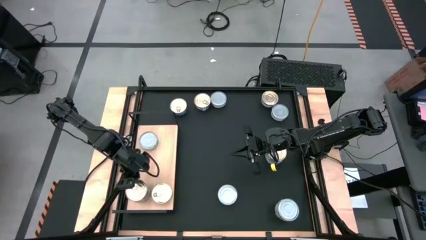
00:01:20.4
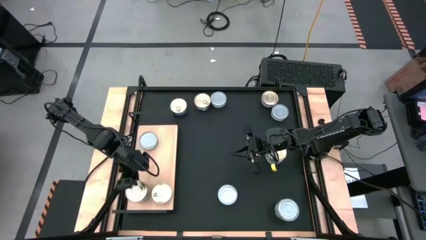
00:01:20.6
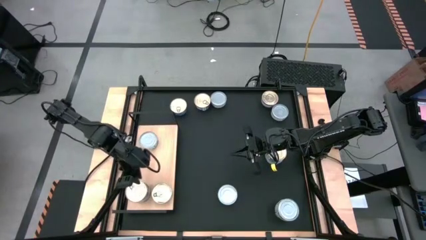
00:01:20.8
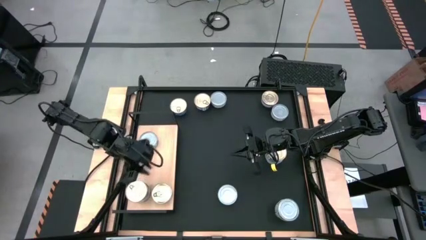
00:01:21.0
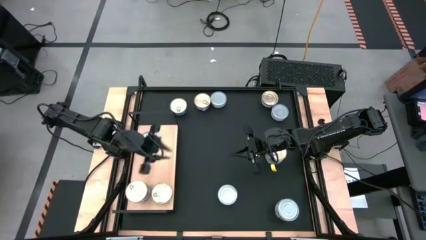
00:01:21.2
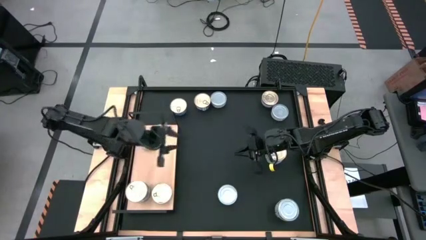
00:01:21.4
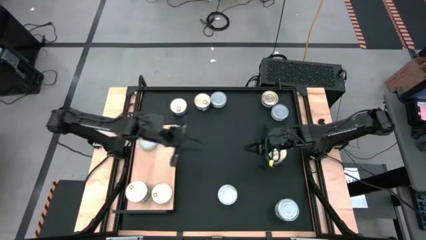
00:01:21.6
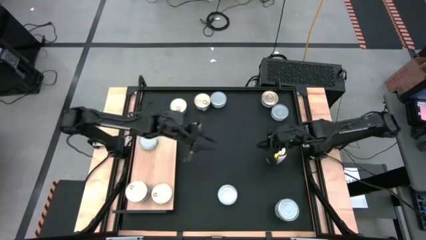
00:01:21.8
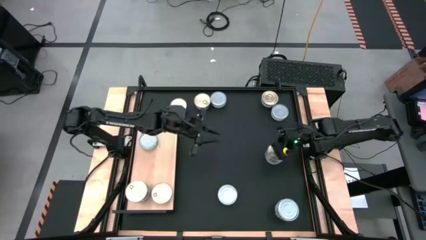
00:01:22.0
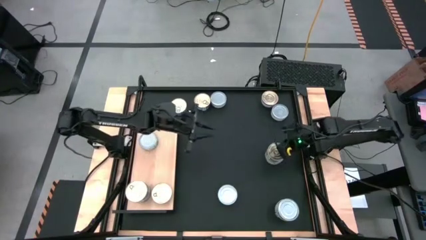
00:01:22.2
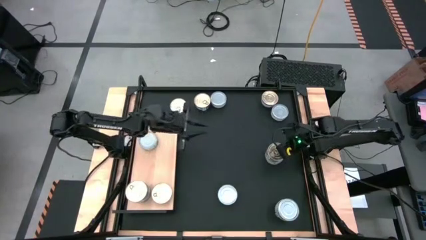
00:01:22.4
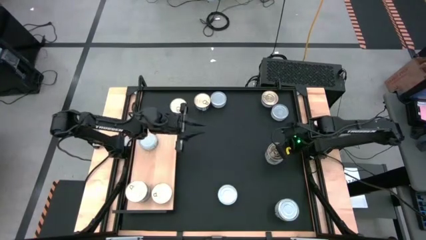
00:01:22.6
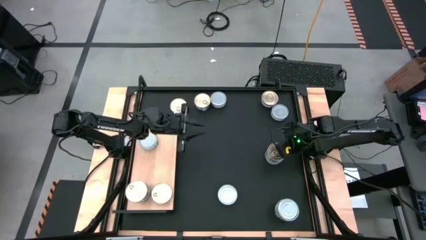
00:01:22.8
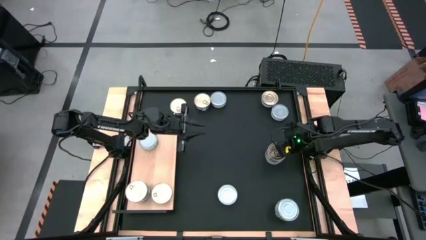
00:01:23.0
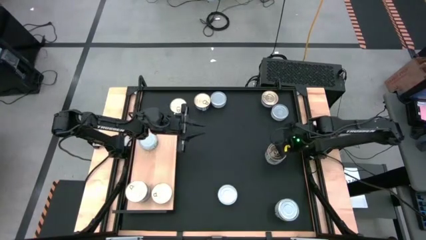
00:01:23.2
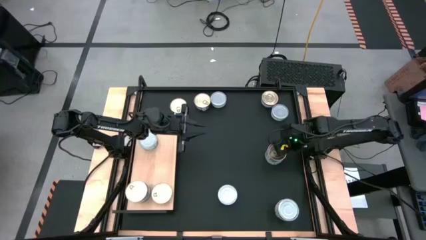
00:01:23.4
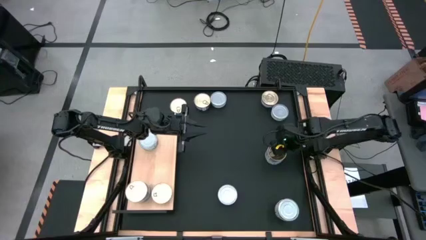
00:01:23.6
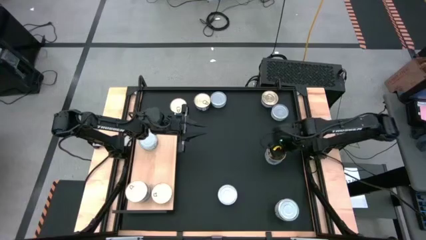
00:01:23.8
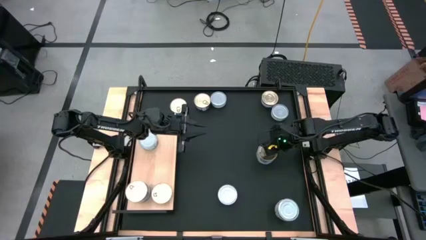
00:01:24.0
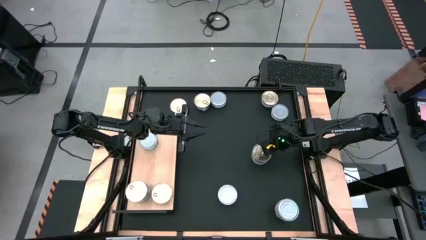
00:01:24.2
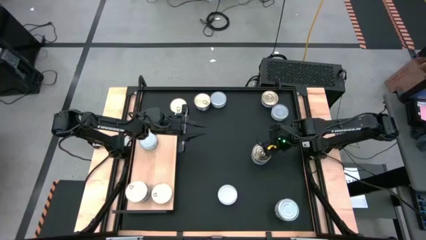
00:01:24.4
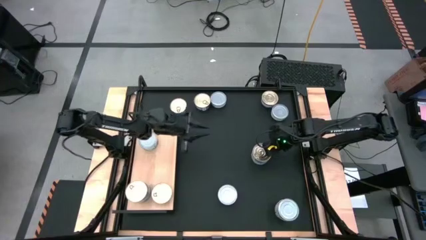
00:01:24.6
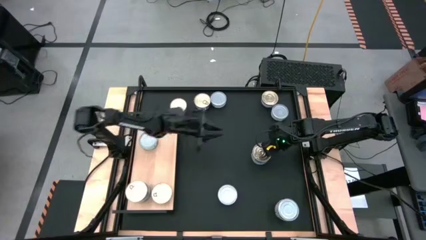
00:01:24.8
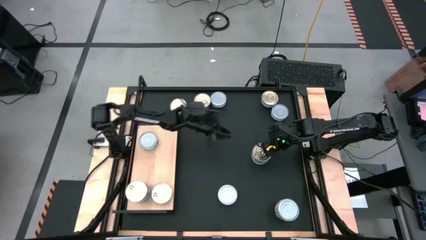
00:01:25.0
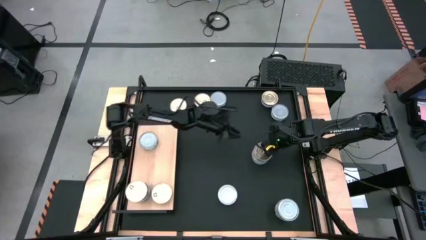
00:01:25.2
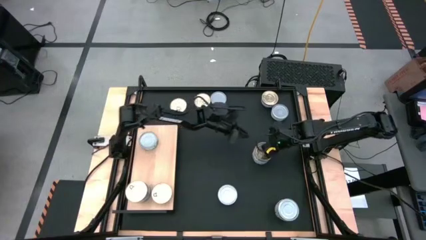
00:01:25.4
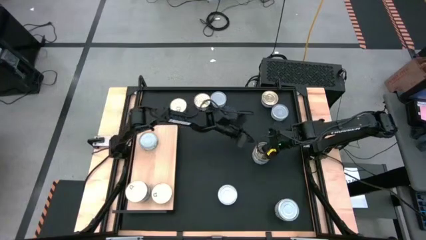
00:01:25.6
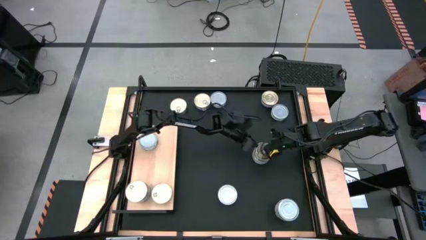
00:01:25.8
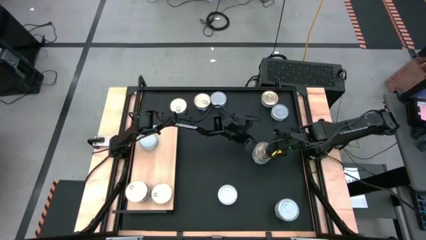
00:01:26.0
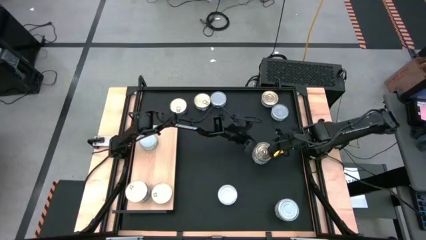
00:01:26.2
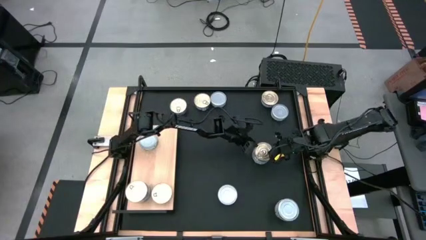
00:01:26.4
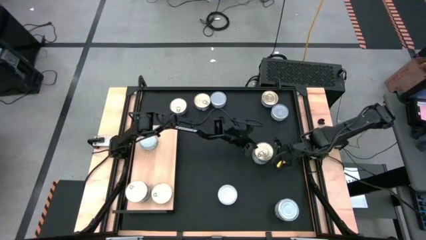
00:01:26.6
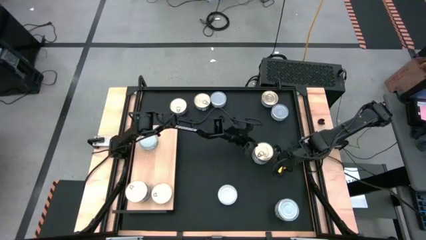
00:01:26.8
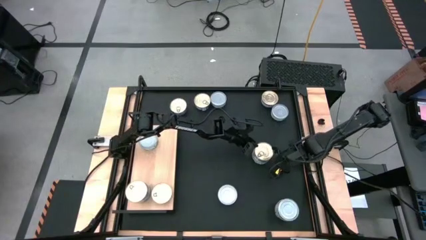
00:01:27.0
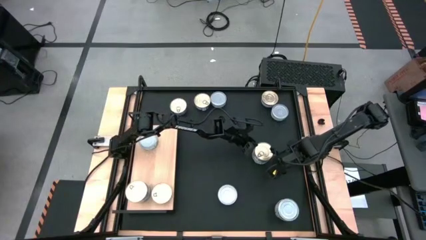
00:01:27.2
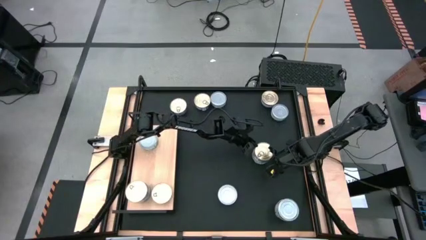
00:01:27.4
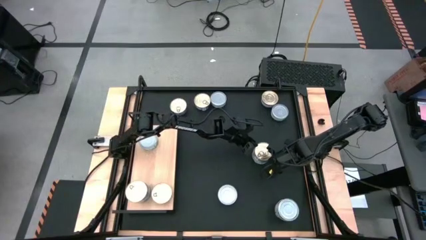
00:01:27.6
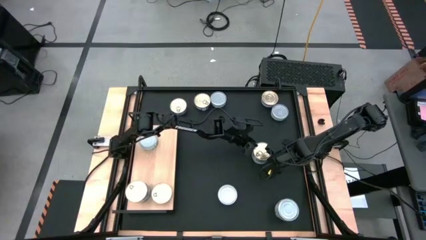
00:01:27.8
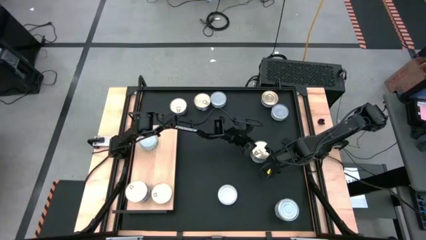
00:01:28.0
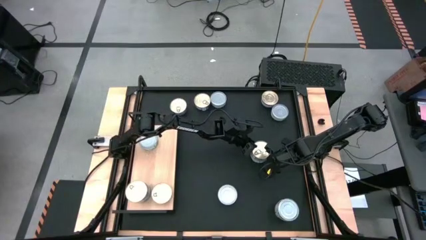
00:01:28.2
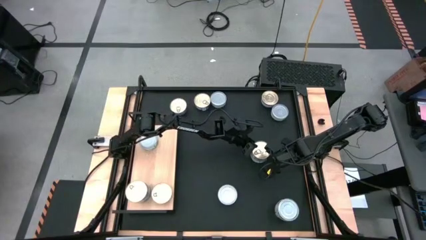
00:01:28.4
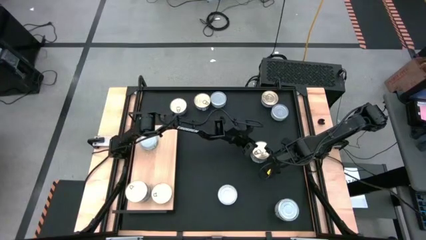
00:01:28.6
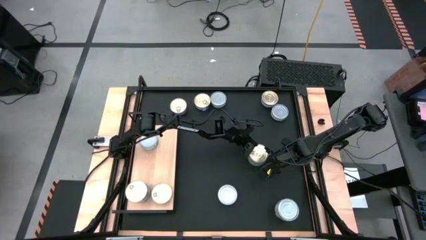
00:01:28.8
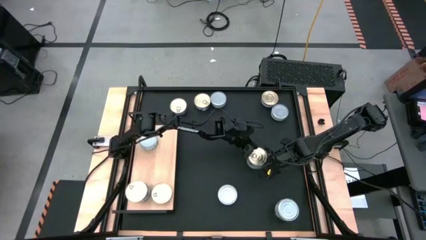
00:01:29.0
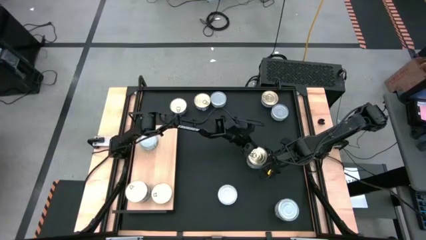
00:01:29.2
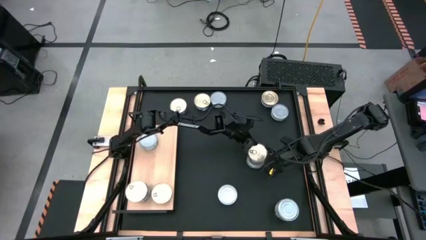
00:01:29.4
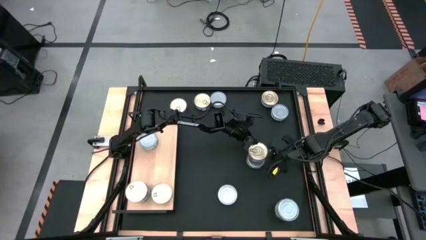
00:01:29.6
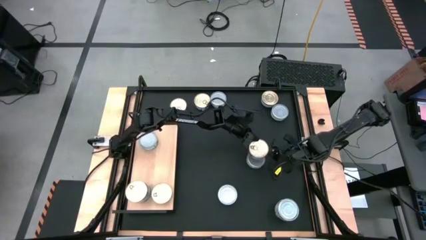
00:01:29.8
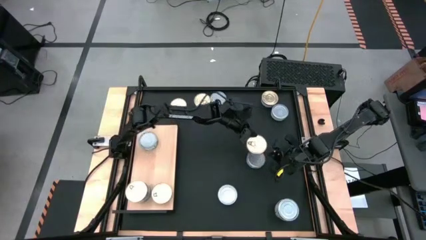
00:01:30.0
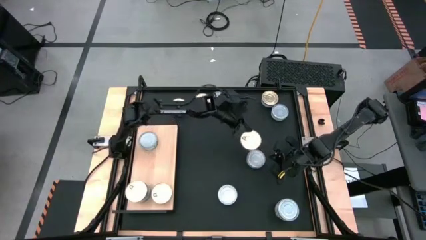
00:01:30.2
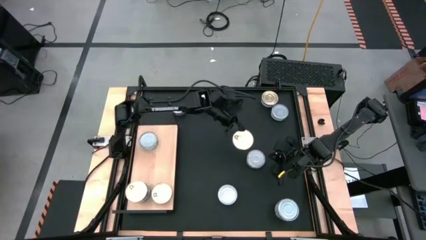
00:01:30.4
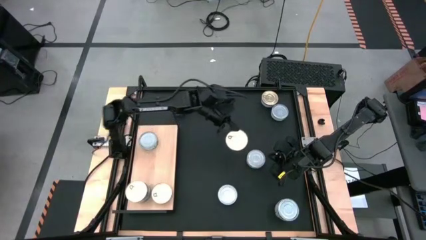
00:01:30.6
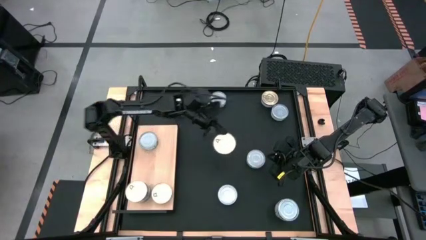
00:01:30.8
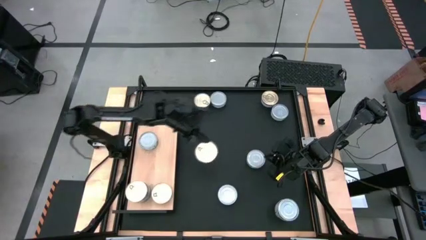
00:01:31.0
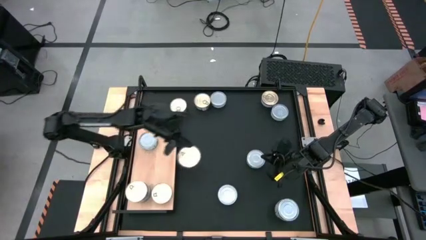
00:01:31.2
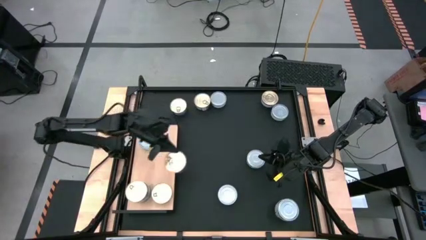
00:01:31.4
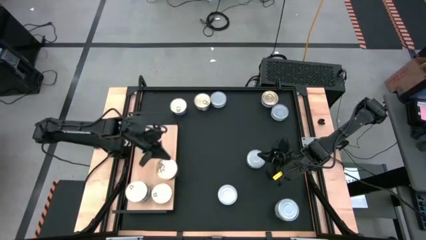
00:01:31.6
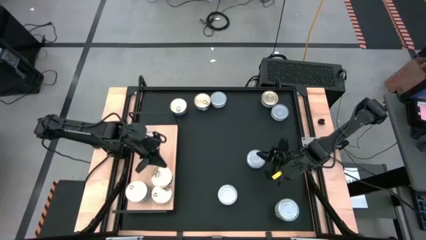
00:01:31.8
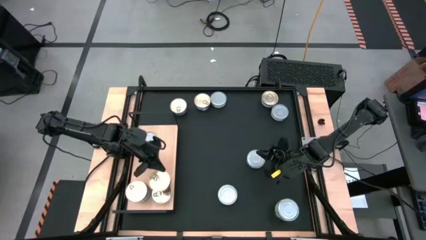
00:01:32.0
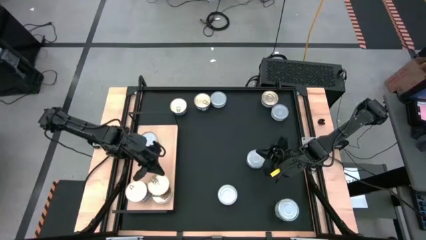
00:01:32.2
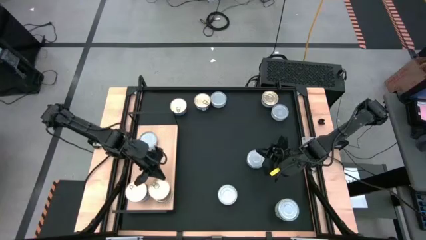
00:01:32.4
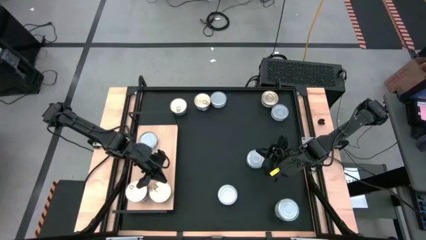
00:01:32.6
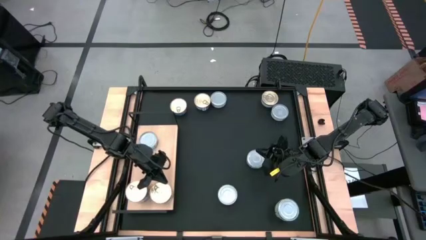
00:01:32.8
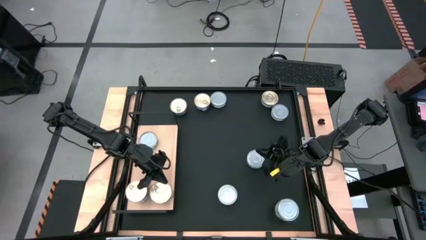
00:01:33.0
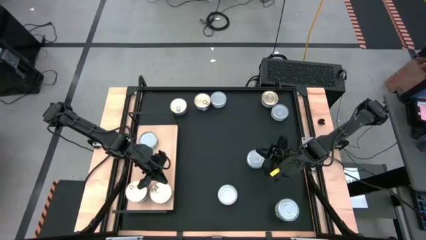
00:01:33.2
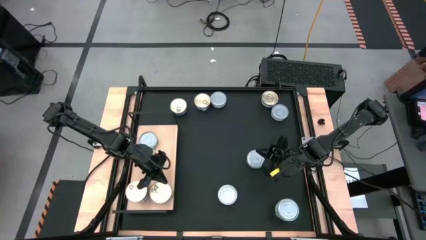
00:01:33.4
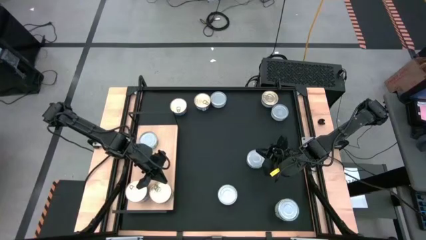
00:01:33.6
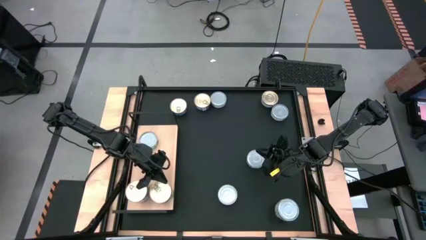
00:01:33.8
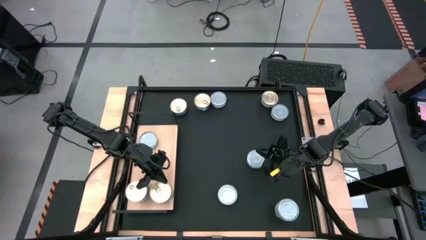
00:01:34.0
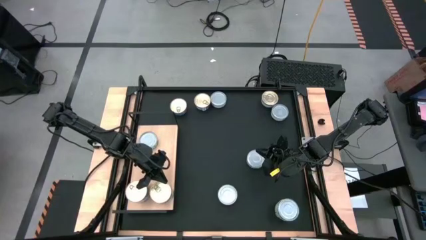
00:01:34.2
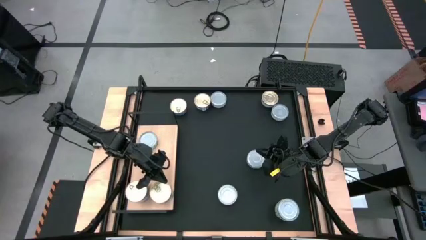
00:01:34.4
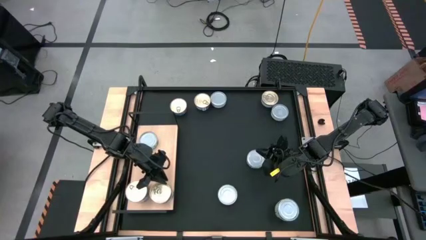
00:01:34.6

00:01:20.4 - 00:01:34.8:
Task: Stack canned seafood by type on shelf
Stack the blue tuna can on top of the blue can on the shelf

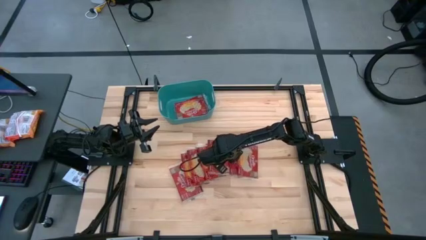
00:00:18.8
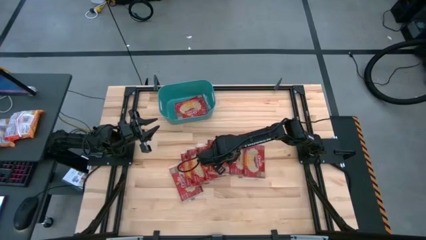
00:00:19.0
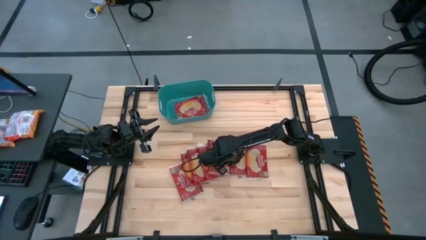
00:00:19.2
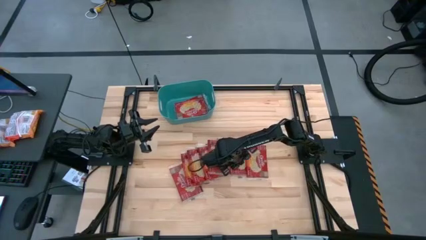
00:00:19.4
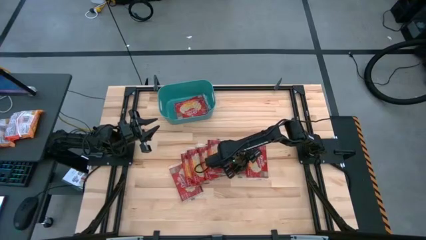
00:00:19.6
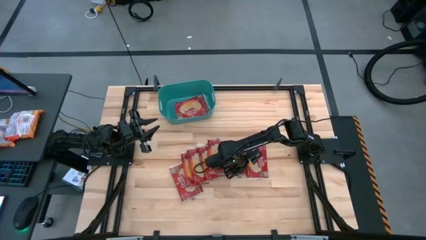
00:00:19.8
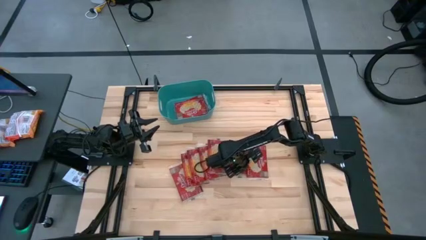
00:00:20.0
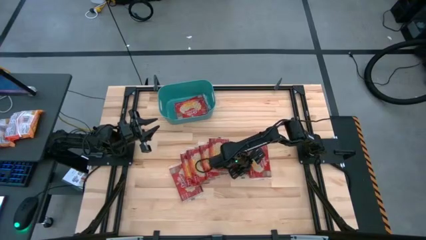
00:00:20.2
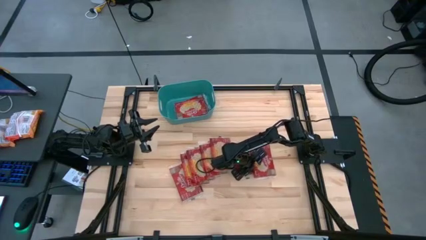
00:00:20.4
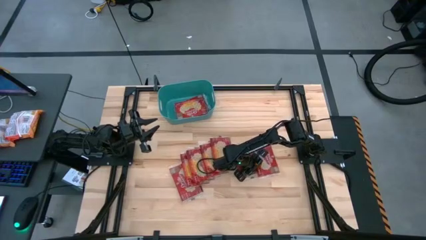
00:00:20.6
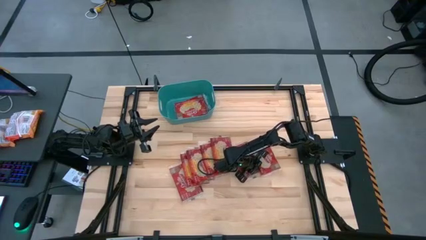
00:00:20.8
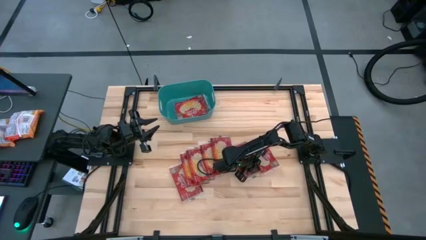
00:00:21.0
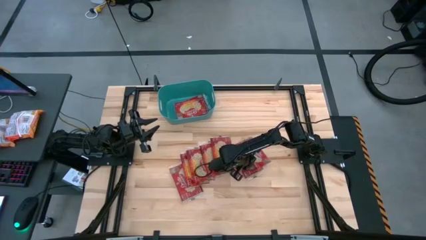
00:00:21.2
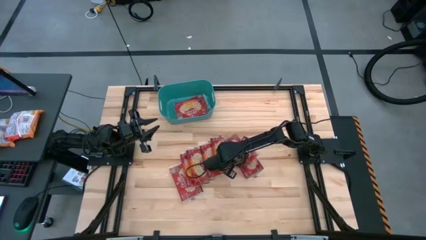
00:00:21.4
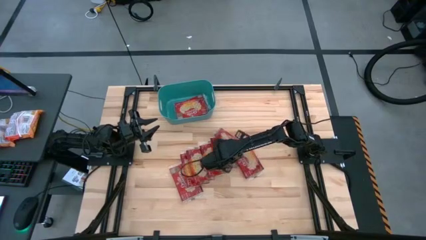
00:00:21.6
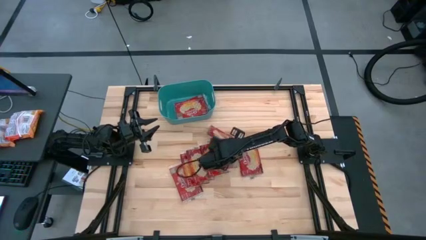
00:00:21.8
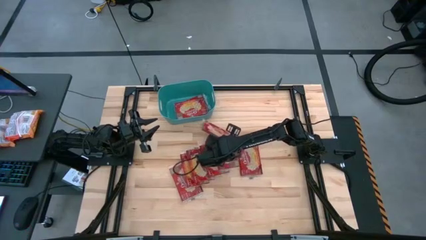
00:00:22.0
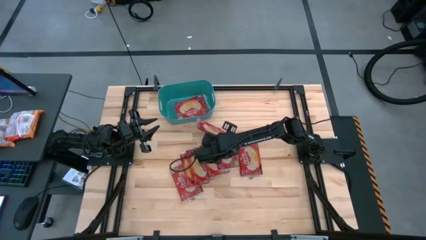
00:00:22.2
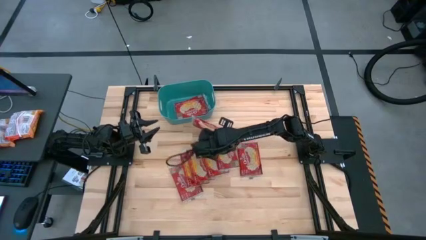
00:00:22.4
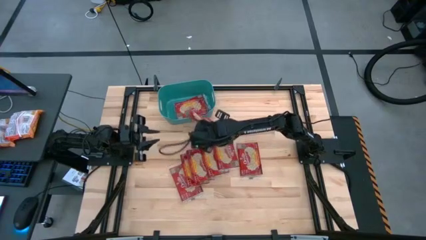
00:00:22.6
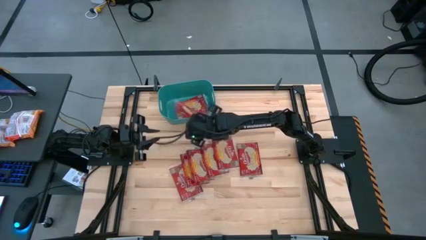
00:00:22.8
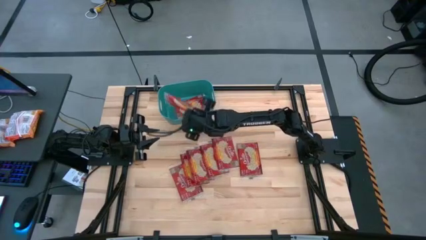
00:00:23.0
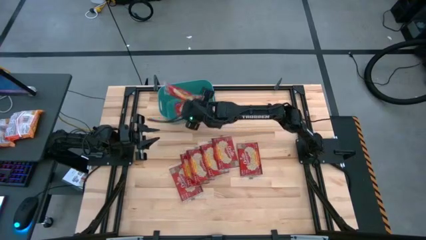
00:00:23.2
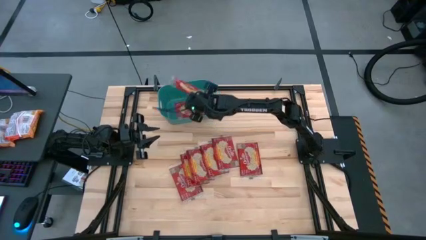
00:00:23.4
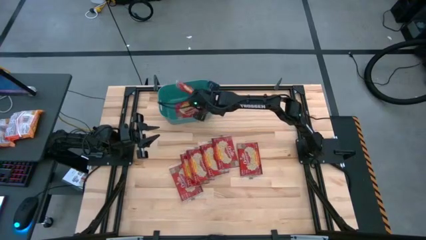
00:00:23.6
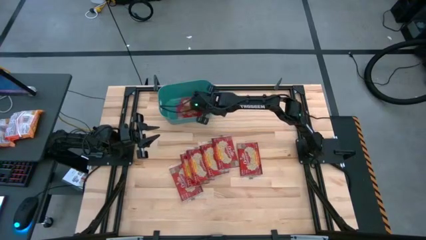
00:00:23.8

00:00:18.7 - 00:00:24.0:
Task: Sort popcorn bags into baskets
Put the red popcorn bag into the blue container
